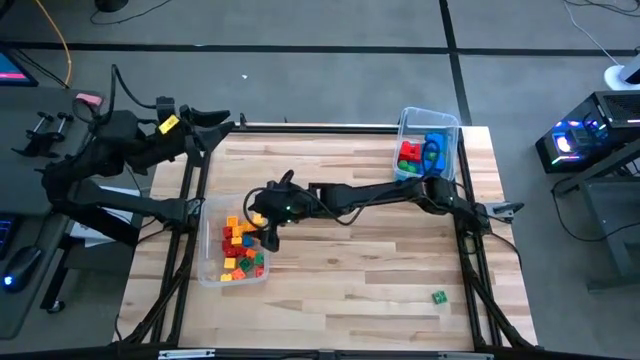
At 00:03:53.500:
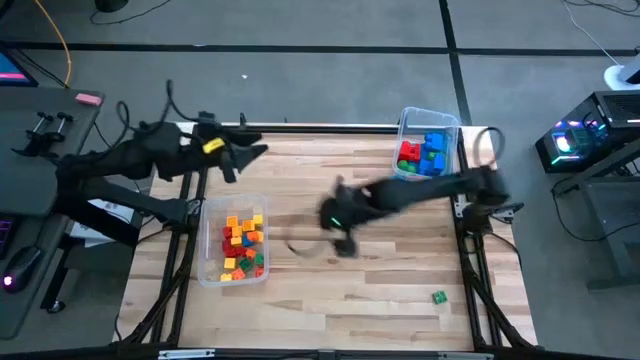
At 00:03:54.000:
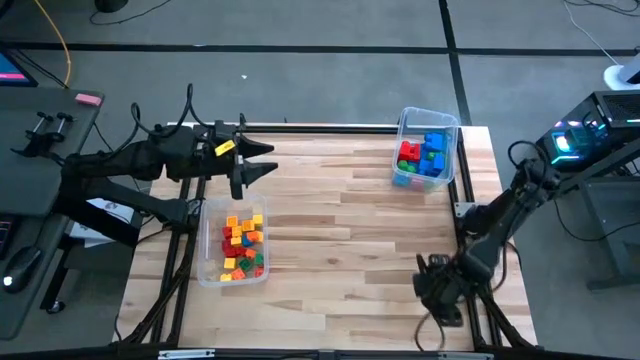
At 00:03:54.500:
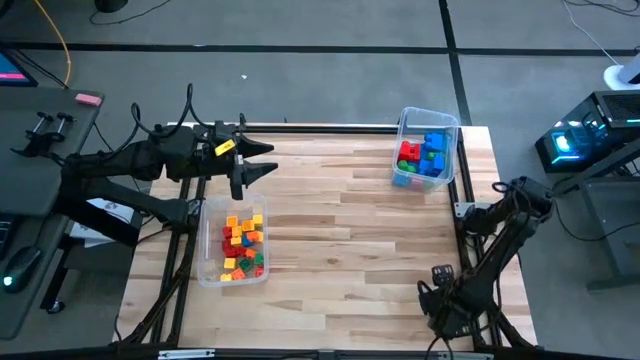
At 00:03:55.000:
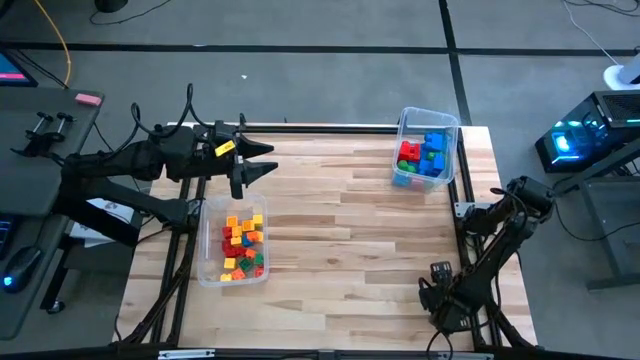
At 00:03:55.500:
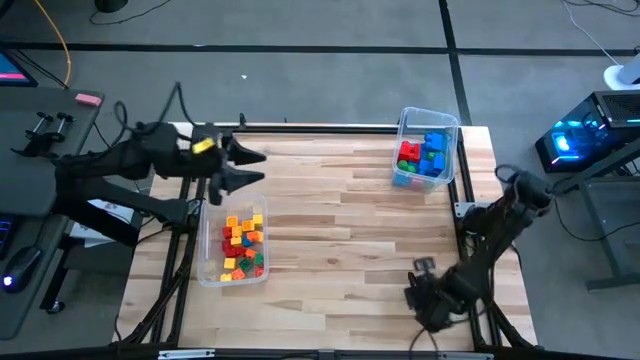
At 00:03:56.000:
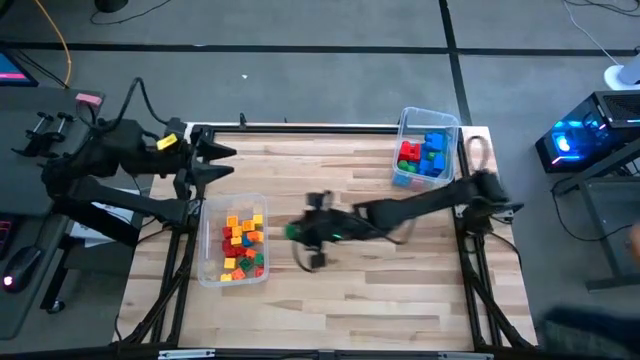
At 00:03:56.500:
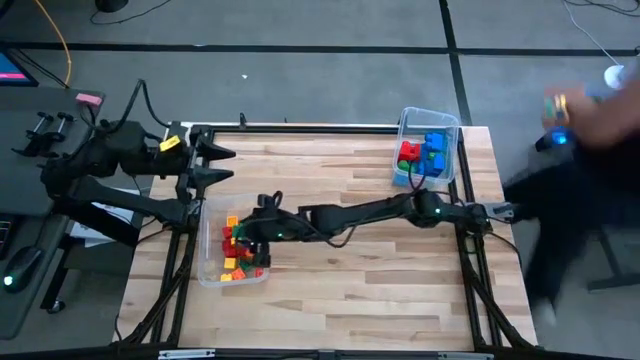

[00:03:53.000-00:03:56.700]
Task: Sort blocks by size
Put the small green game piece into the left transparent bin

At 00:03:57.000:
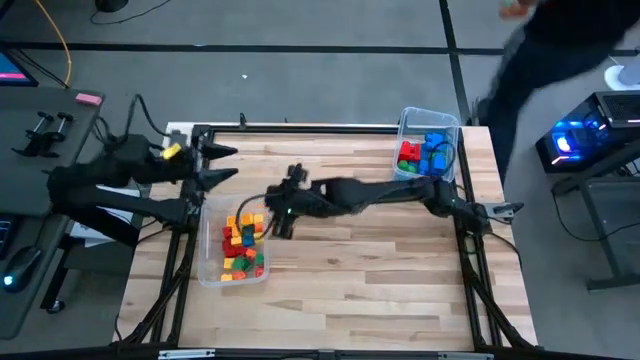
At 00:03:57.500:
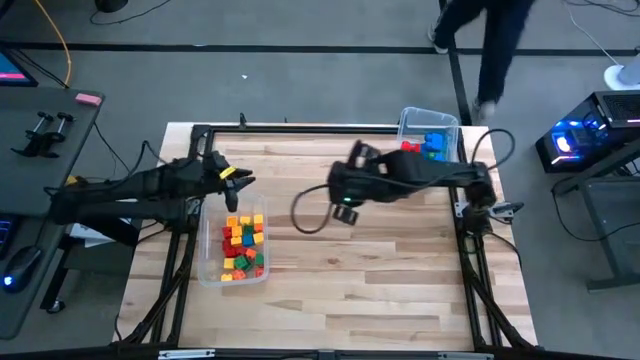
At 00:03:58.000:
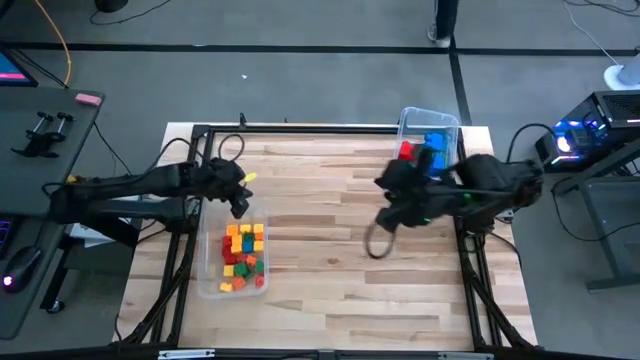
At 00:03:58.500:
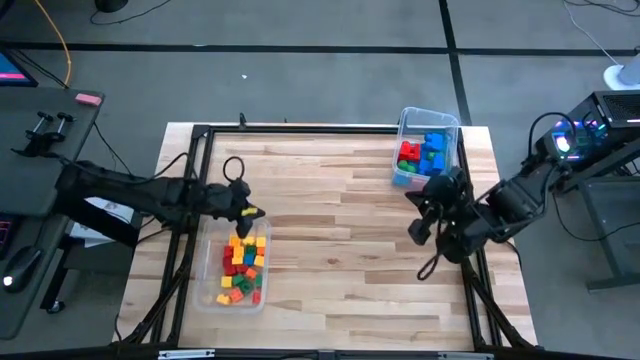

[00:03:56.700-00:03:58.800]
Adjust the left transparent bin

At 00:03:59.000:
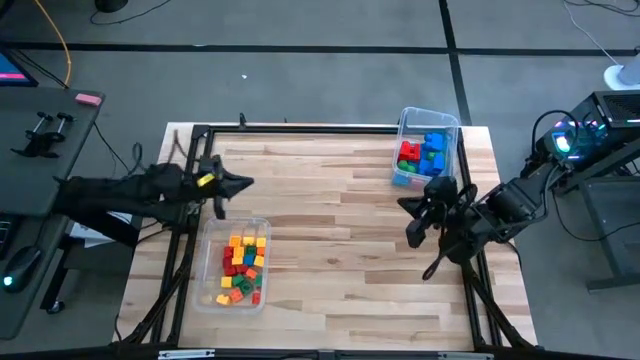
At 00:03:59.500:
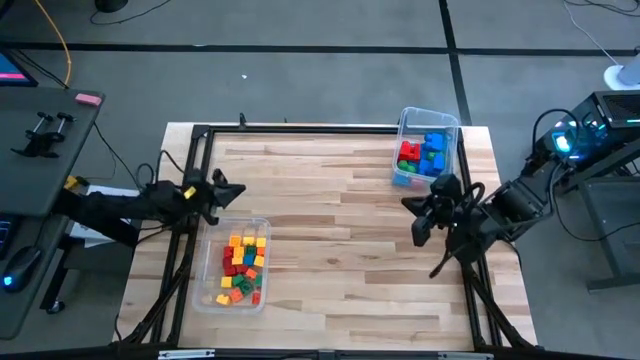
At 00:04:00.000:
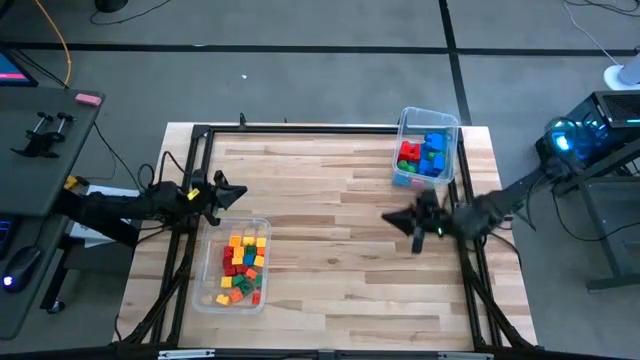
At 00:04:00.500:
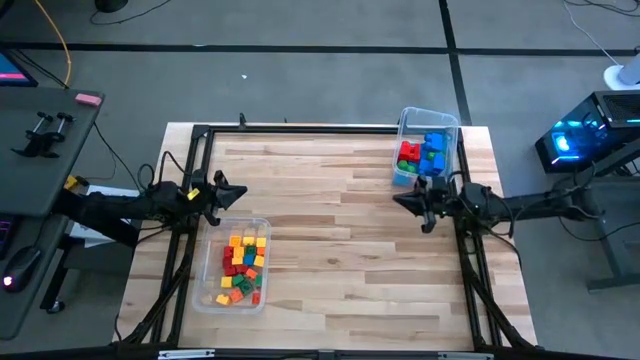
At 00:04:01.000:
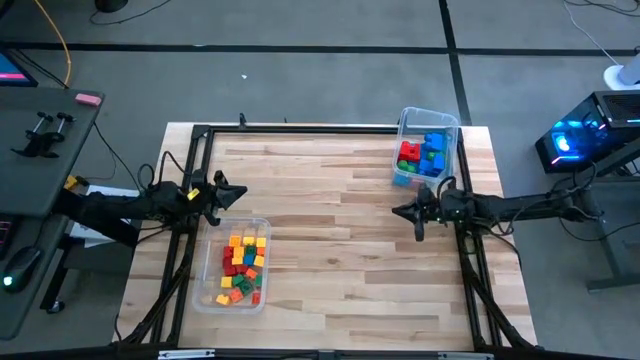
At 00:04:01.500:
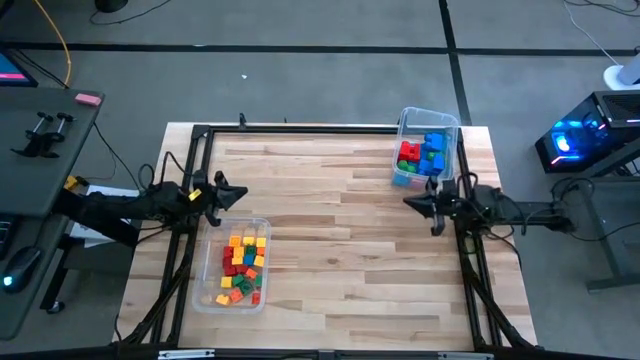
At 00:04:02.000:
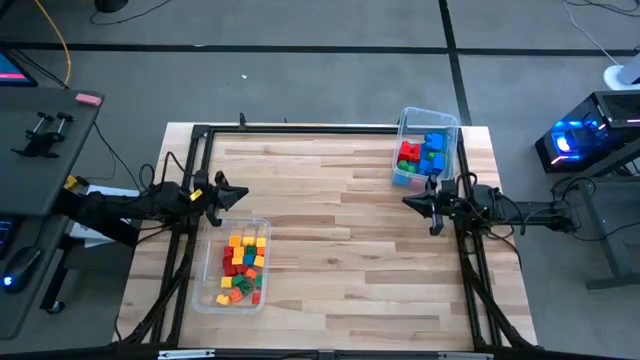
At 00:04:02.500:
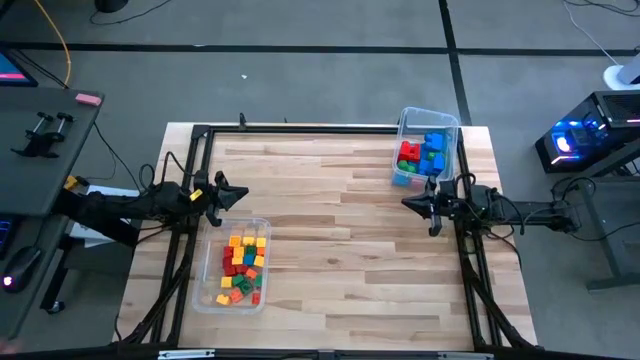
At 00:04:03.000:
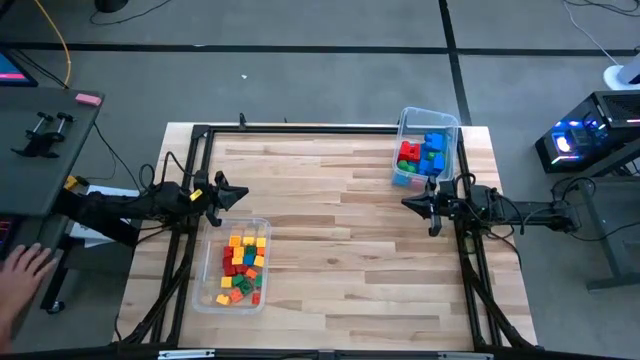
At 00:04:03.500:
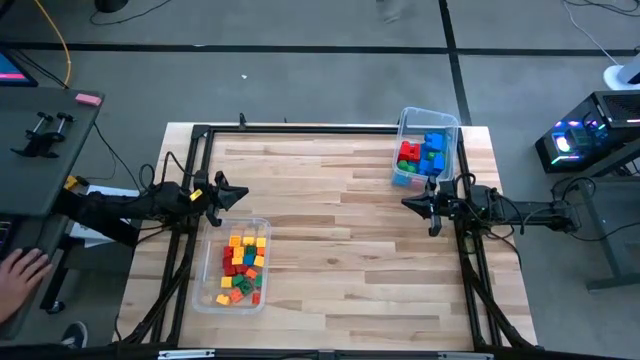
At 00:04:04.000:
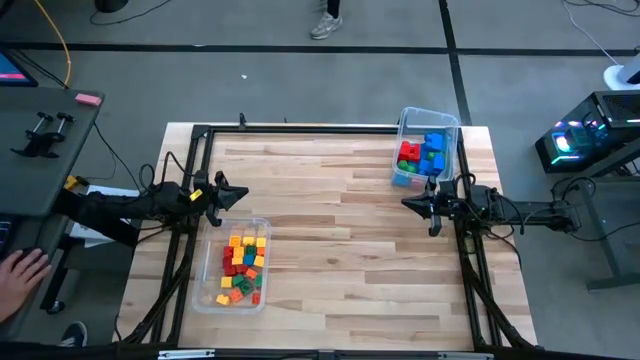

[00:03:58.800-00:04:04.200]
Return to Home Position

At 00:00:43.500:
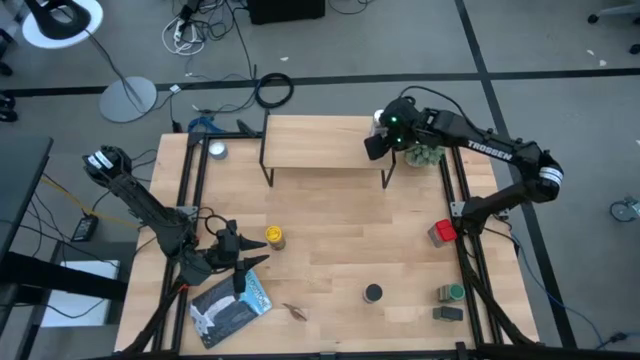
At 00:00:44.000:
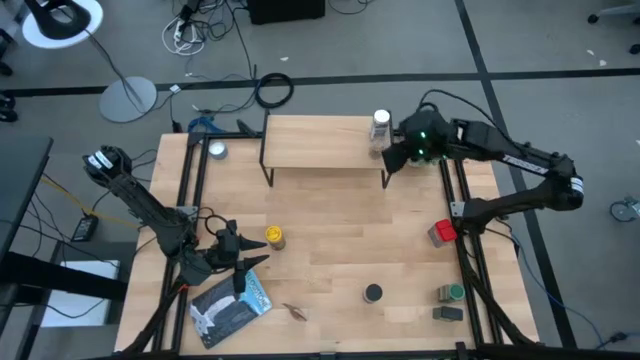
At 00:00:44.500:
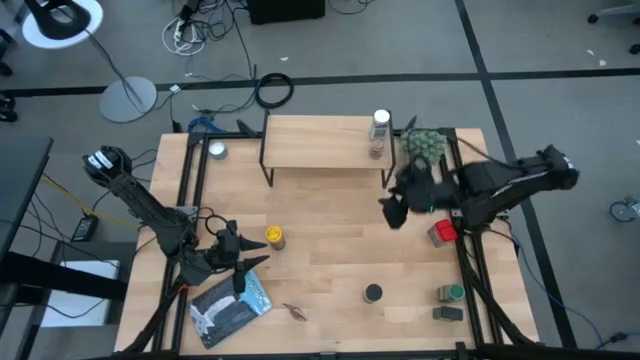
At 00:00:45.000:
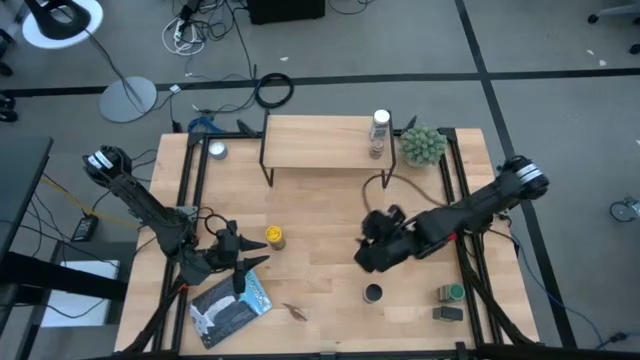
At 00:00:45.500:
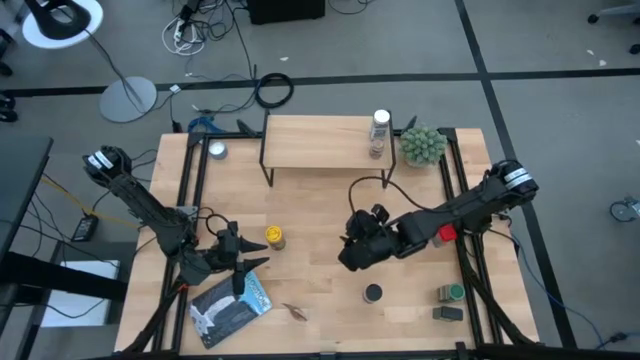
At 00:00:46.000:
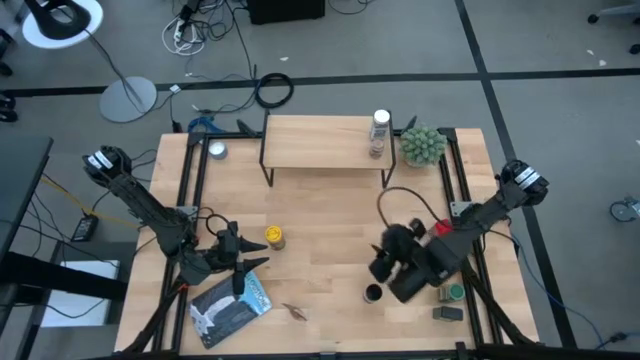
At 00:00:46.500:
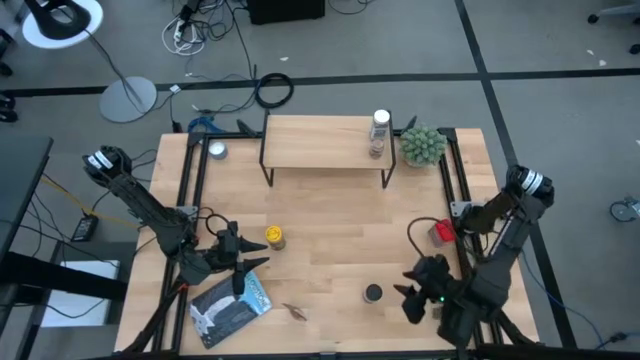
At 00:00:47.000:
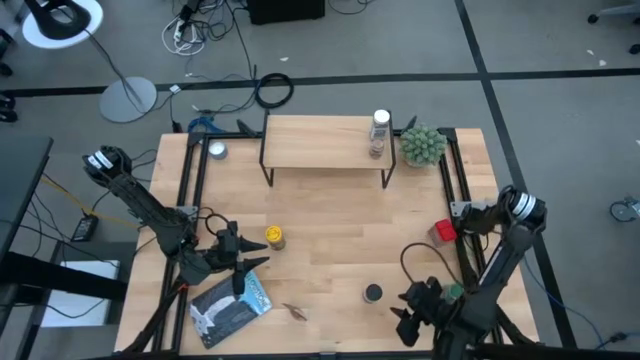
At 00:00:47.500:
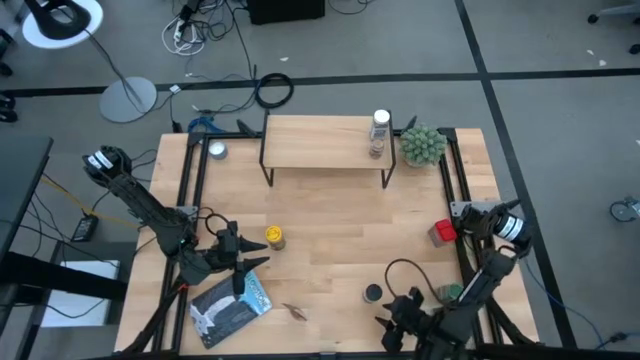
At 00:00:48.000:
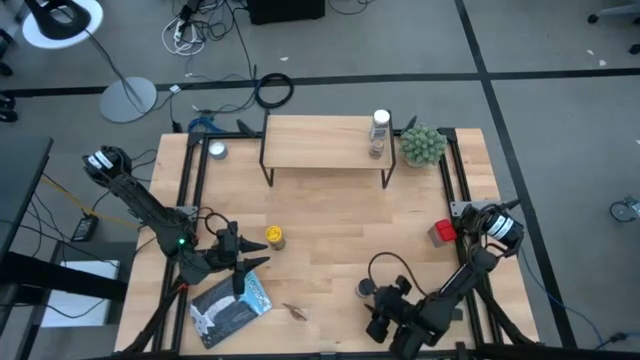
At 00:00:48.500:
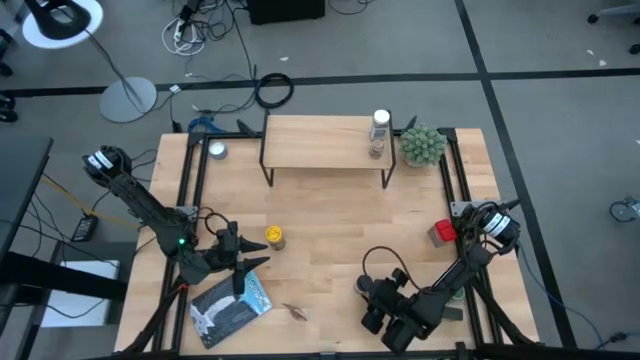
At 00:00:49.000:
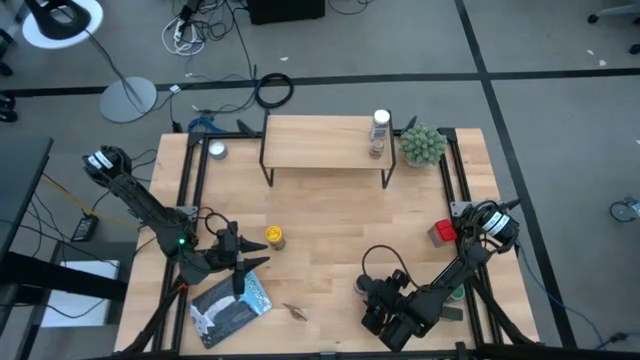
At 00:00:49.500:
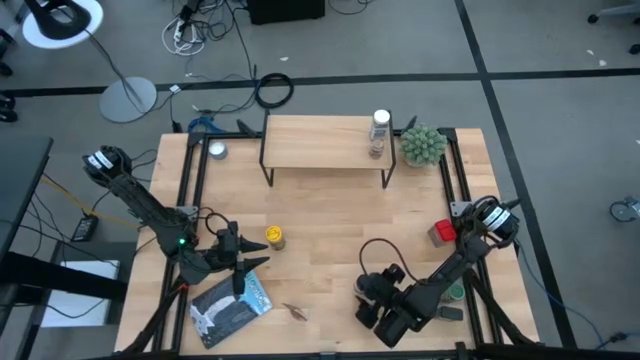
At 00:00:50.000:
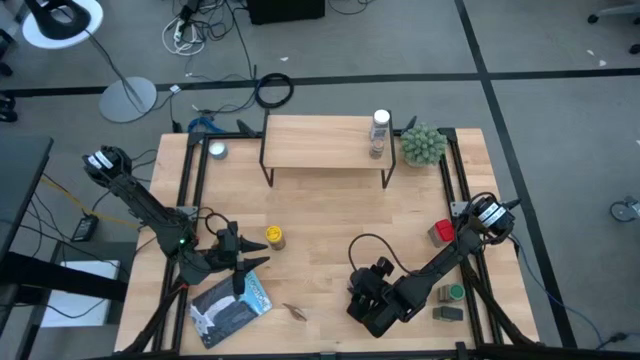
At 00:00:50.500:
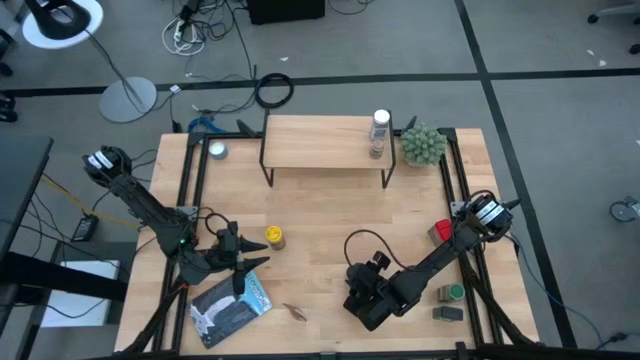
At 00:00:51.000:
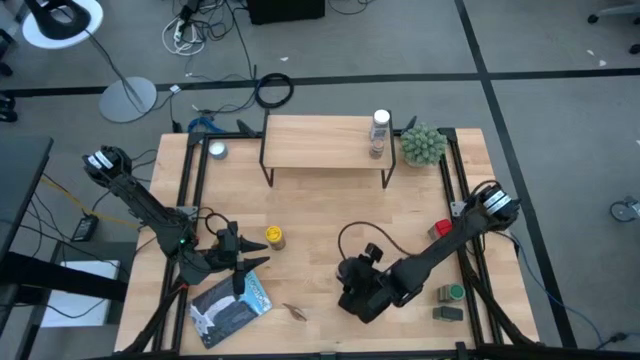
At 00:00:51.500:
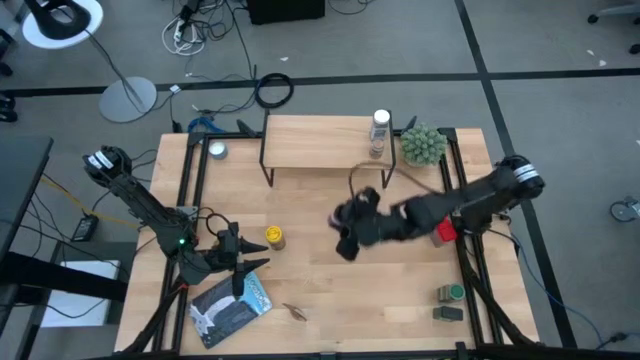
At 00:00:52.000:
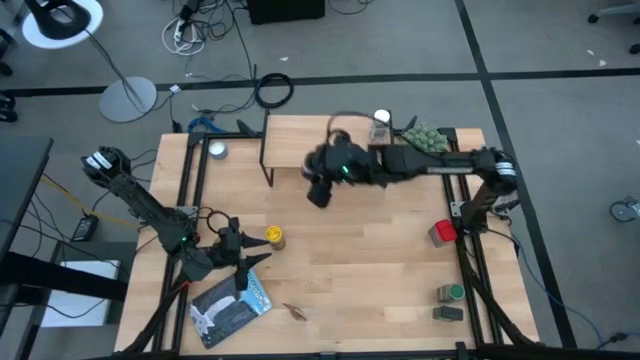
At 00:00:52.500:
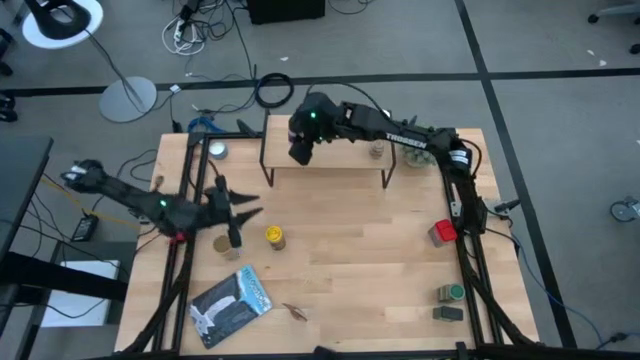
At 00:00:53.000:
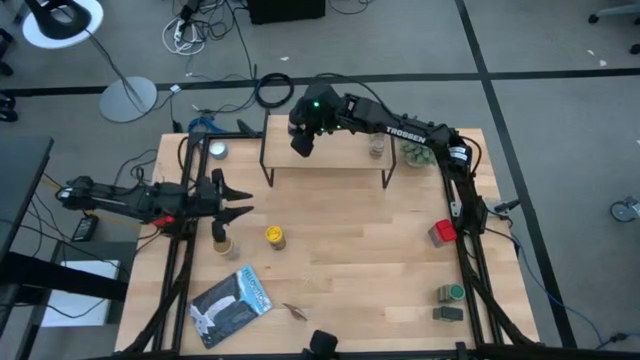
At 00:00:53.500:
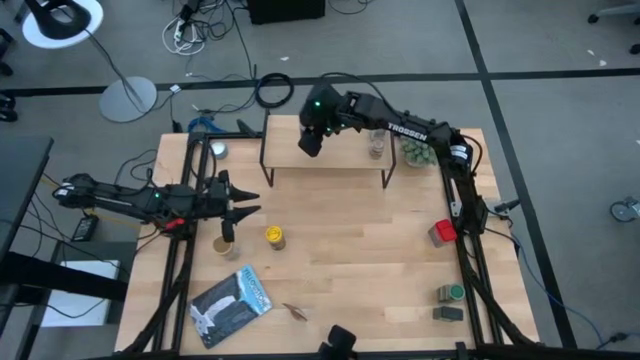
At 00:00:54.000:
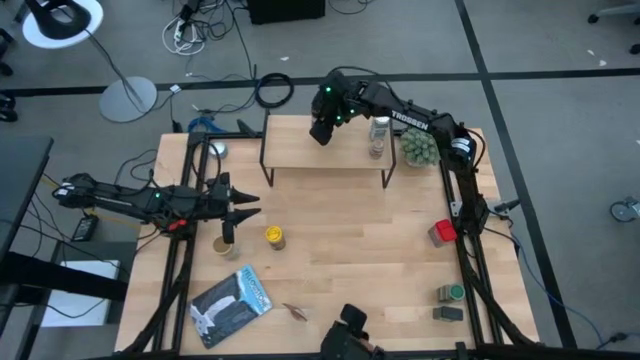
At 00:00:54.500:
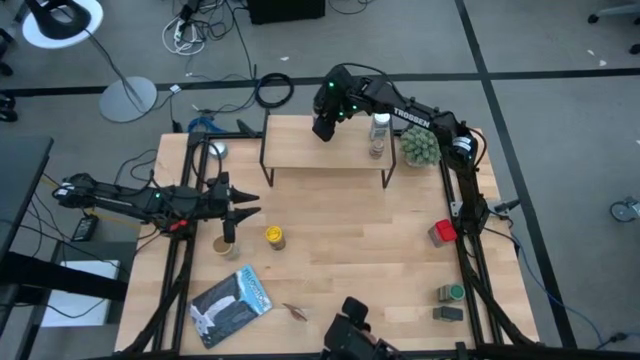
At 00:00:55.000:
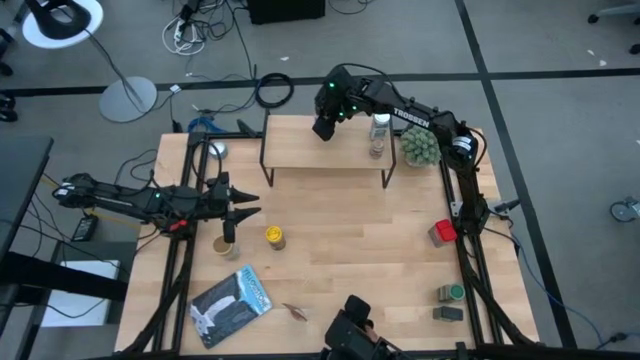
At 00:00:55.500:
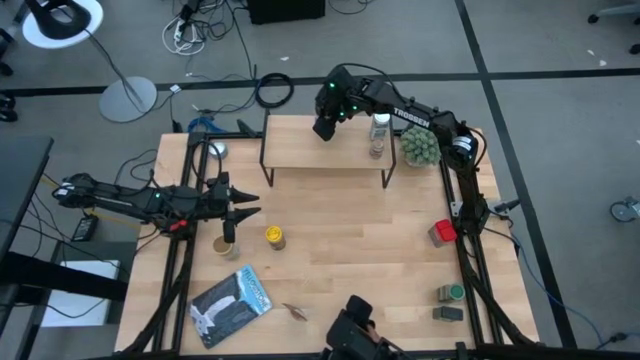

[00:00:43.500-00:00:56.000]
Task: Shelf spices
Put the black seasoning bottle on the shelf
